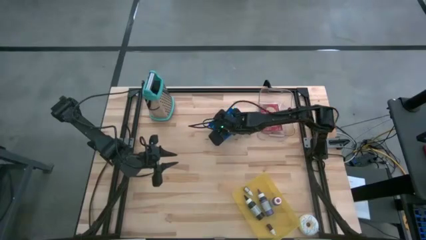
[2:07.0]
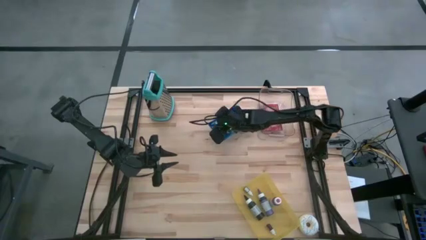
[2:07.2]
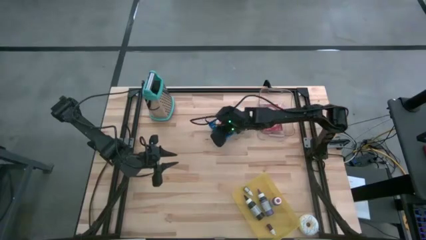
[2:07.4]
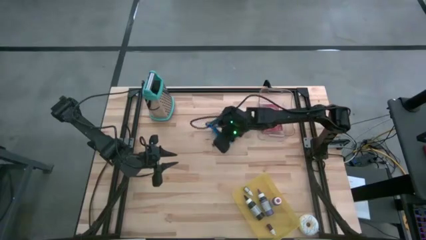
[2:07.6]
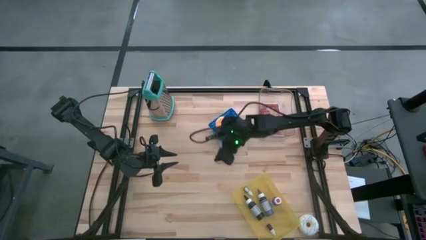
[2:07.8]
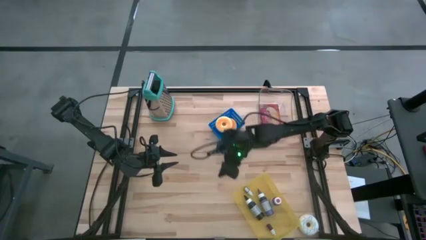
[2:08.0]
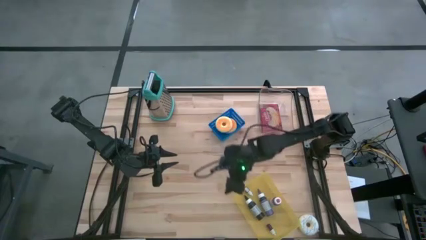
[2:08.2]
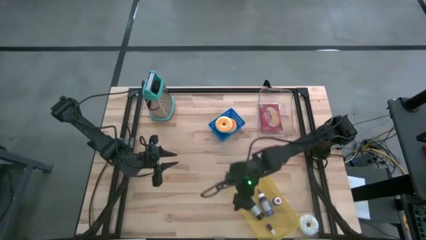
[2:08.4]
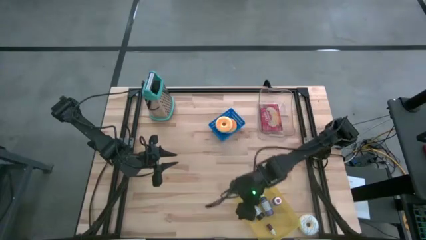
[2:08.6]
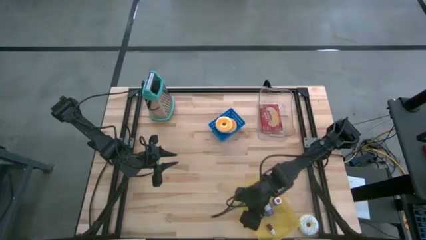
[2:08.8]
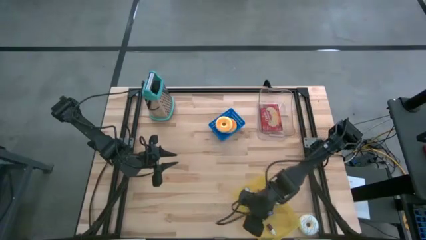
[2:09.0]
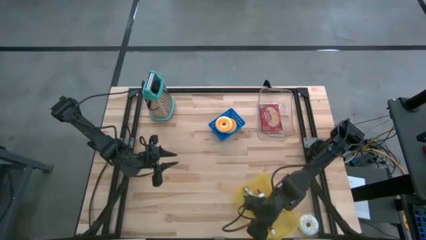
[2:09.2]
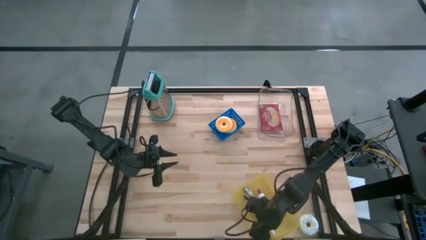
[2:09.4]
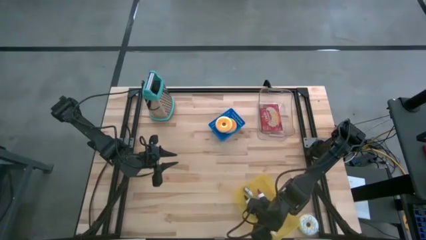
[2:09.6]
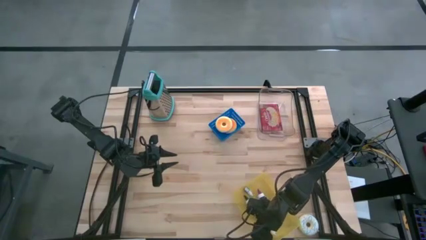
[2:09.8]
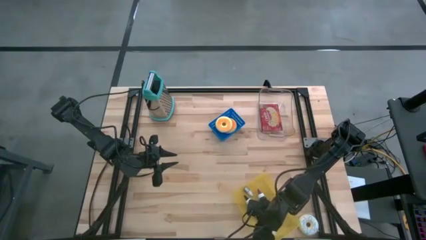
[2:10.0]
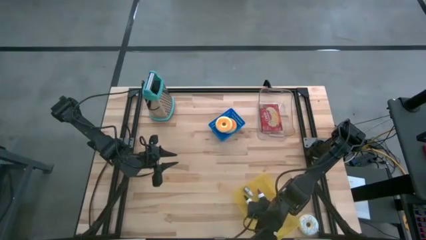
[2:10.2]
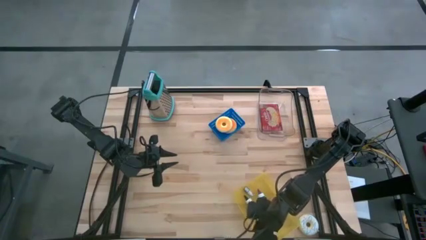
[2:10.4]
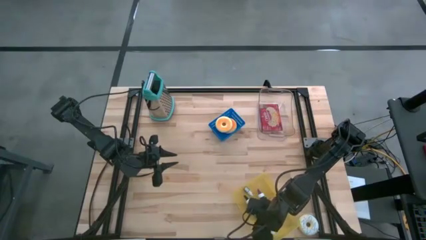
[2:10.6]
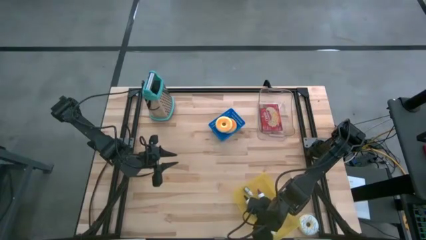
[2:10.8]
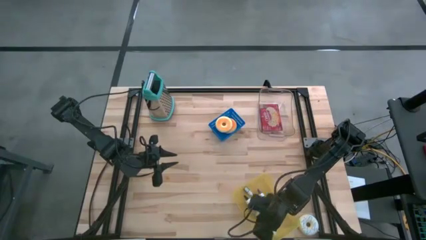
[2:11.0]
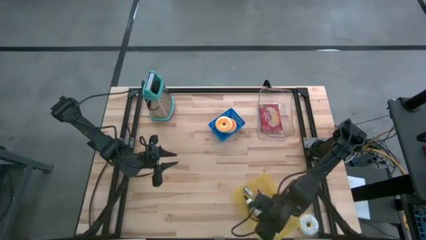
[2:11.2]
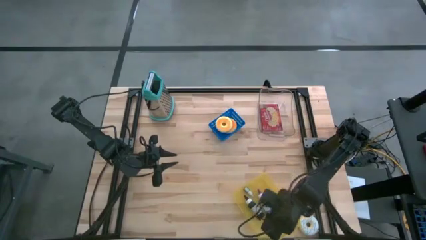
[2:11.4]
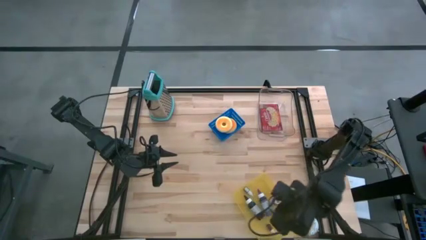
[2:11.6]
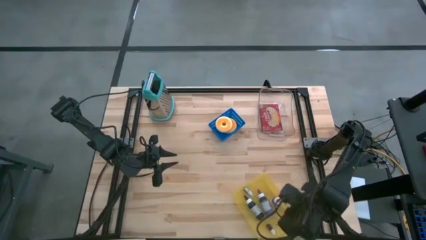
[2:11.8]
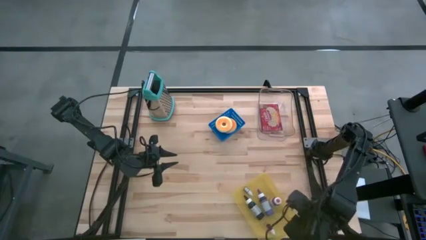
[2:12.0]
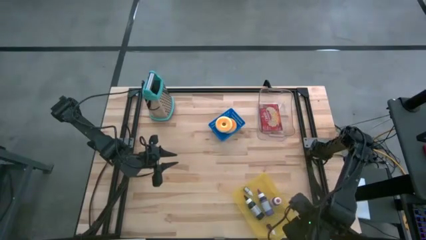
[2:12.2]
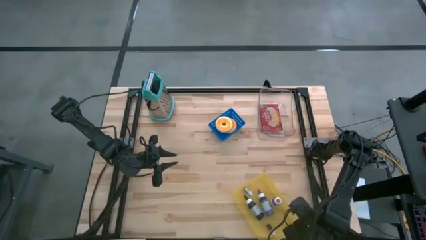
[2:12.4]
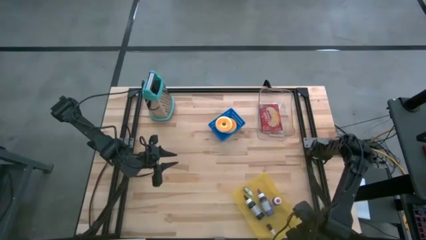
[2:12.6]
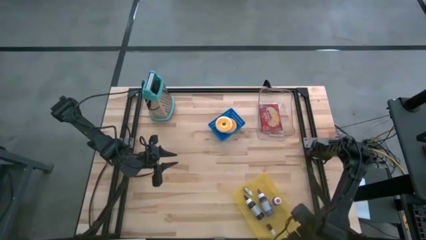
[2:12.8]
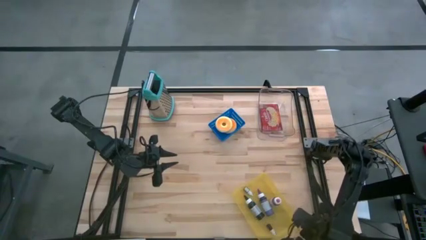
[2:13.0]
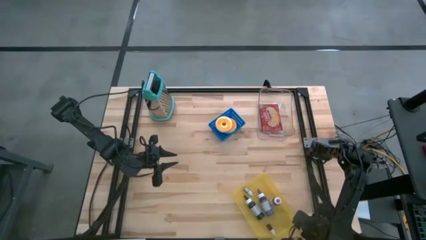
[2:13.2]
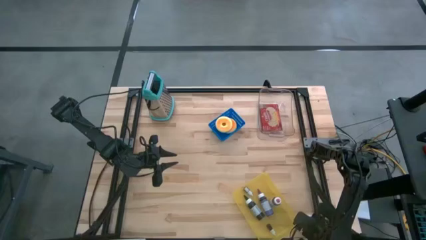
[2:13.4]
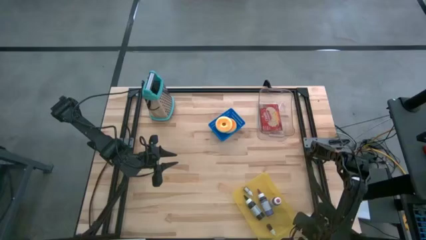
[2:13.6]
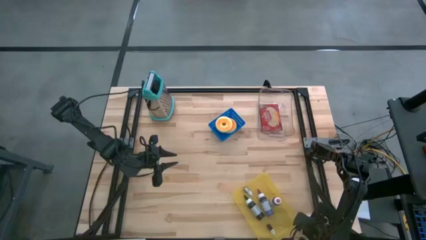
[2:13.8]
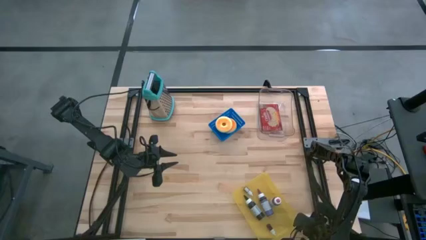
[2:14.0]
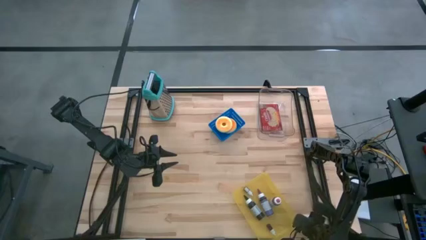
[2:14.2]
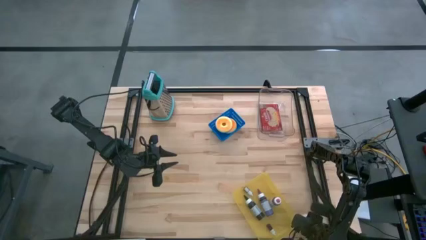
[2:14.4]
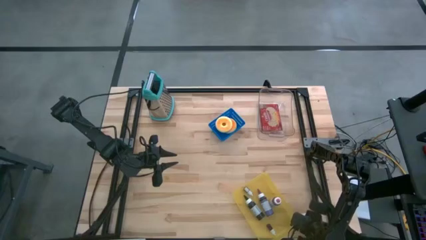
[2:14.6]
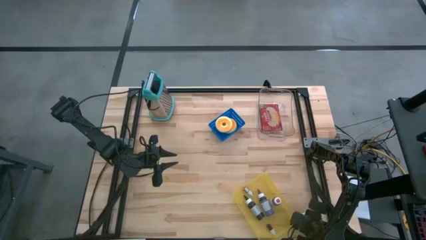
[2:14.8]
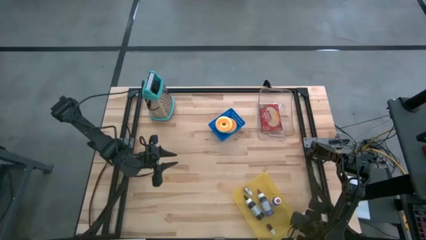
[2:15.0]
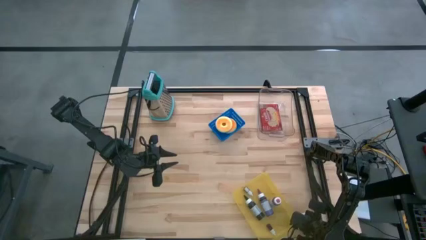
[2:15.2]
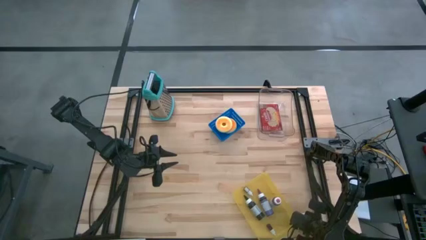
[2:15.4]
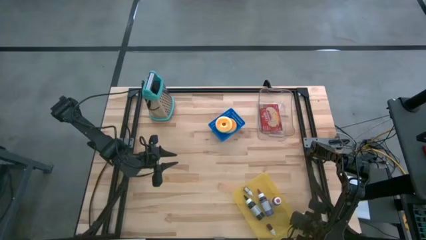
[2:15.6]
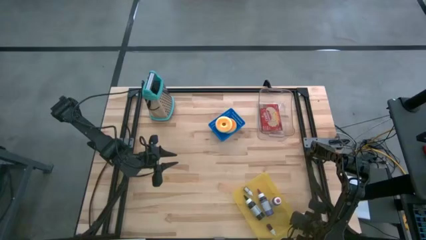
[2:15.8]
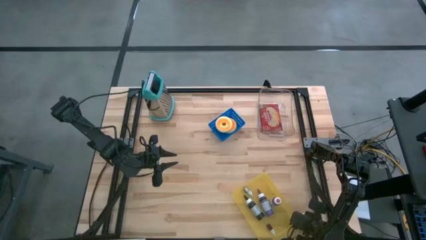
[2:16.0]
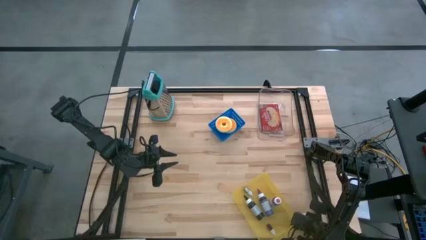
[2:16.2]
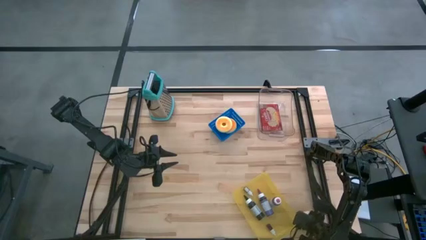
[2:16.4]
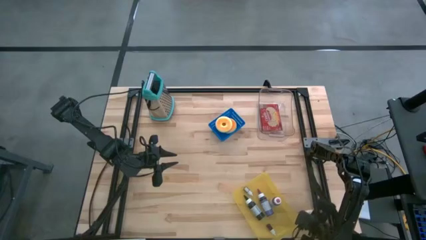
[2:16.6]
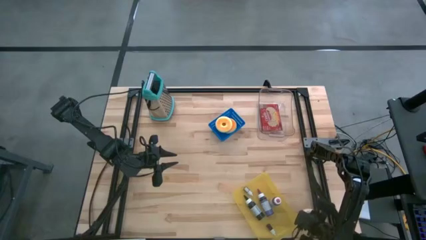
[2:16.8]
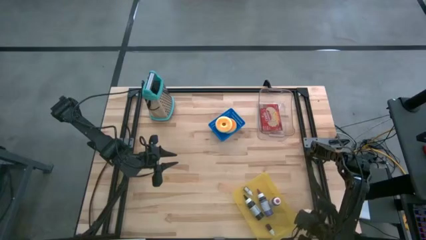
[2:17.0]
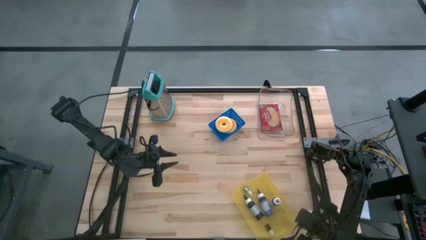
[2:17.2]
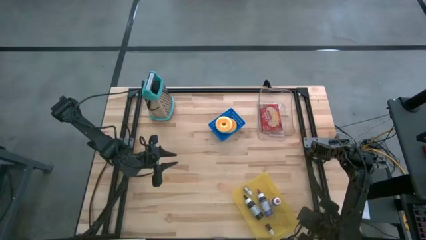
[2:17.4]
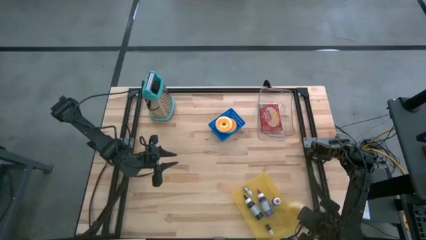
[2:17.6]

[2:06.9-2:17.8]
Task: Pick & Place Food Item
Stack the orange donut on top of the top orange donut in the blue bin

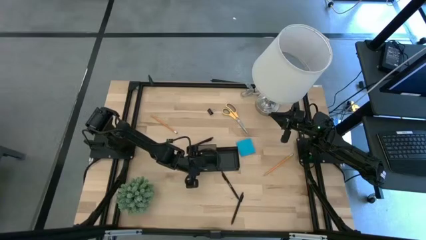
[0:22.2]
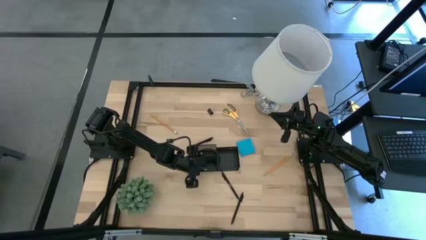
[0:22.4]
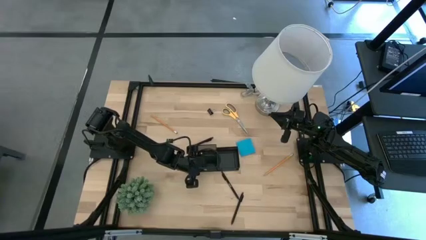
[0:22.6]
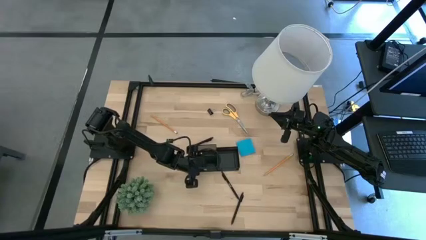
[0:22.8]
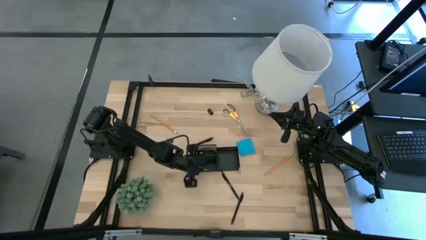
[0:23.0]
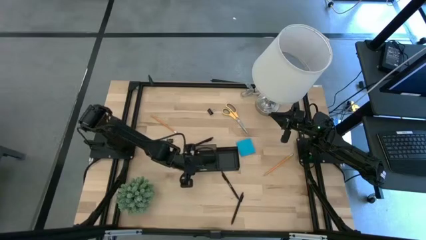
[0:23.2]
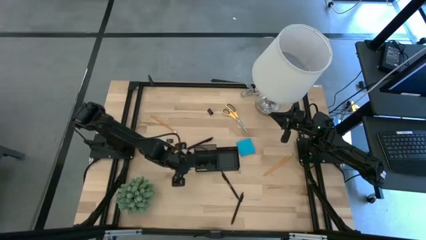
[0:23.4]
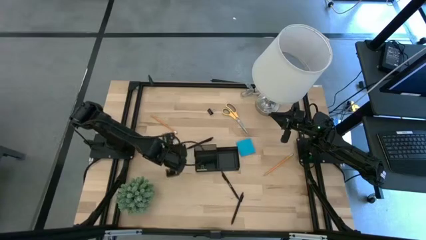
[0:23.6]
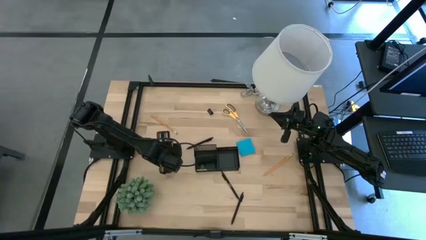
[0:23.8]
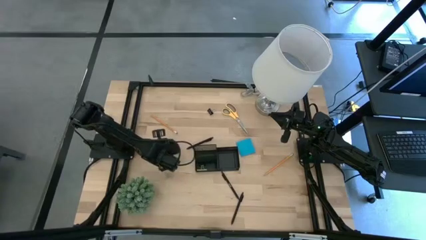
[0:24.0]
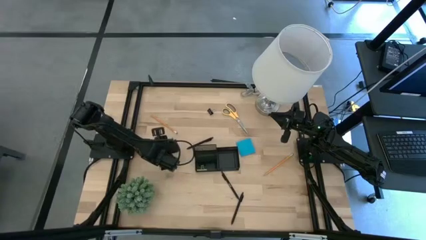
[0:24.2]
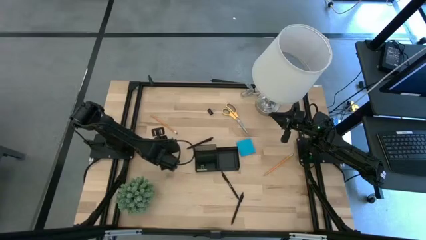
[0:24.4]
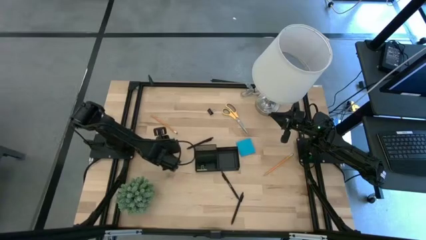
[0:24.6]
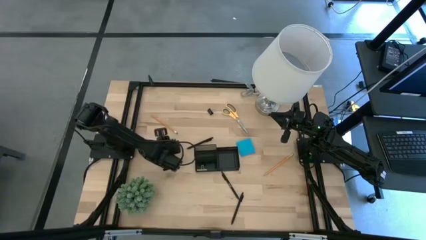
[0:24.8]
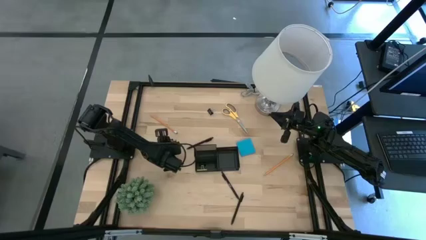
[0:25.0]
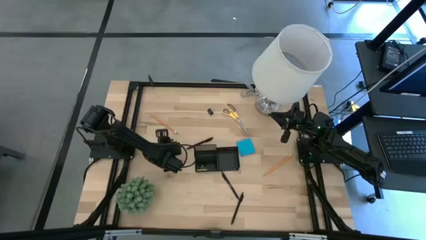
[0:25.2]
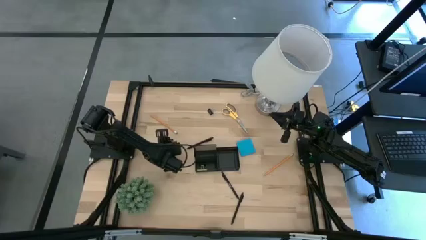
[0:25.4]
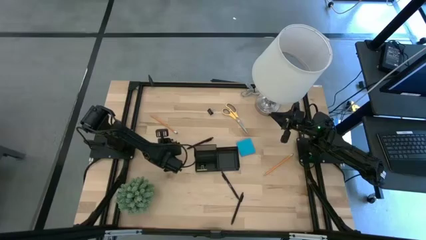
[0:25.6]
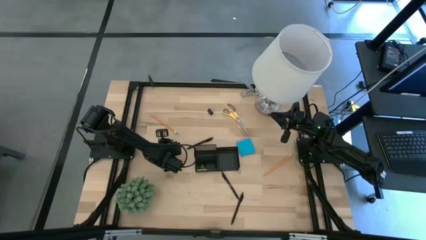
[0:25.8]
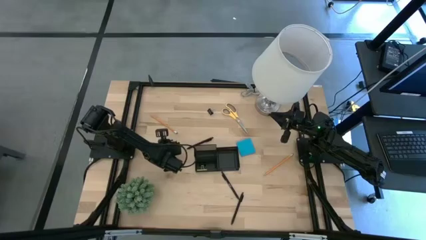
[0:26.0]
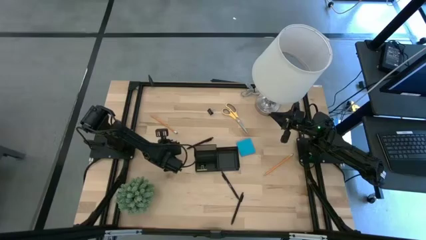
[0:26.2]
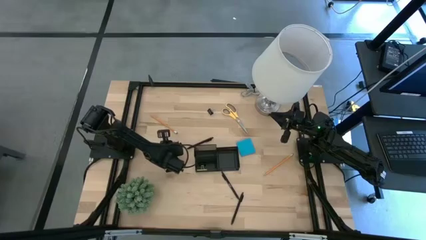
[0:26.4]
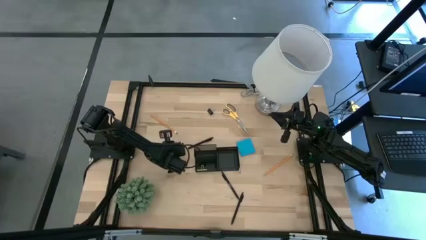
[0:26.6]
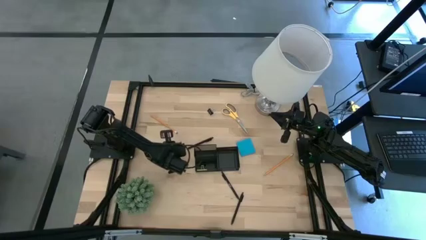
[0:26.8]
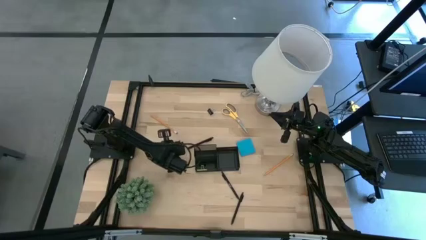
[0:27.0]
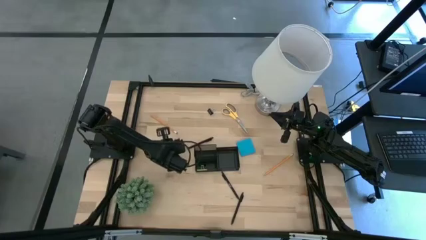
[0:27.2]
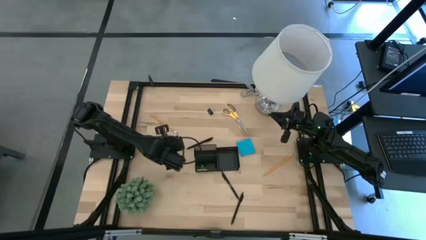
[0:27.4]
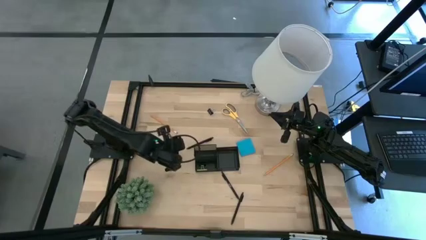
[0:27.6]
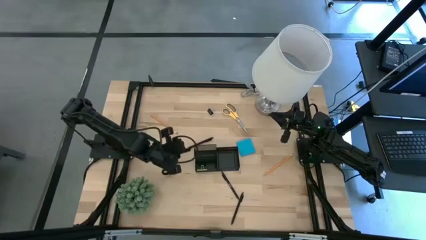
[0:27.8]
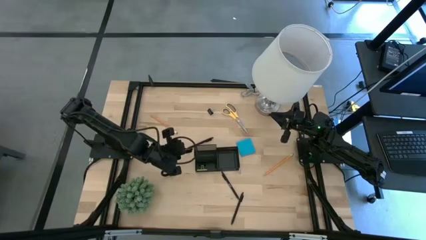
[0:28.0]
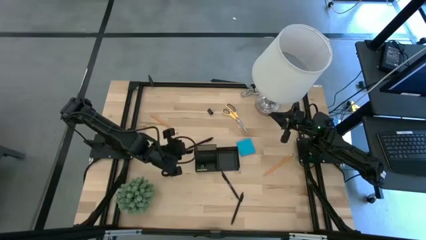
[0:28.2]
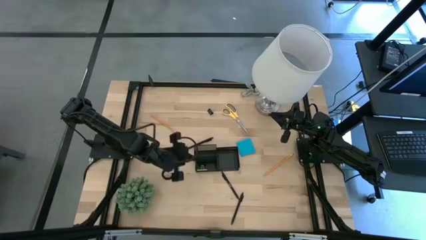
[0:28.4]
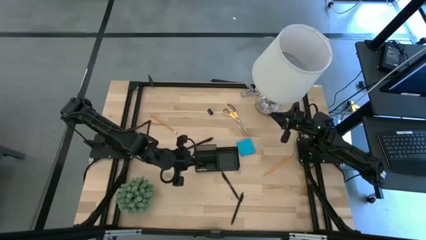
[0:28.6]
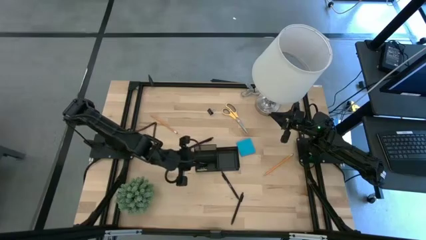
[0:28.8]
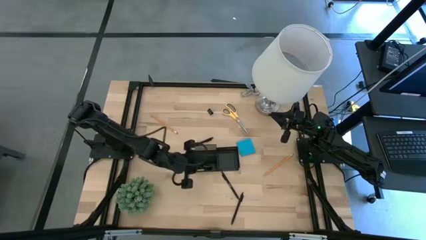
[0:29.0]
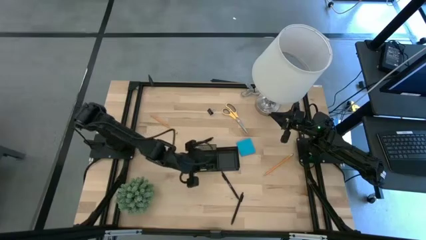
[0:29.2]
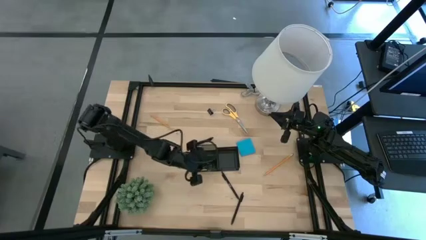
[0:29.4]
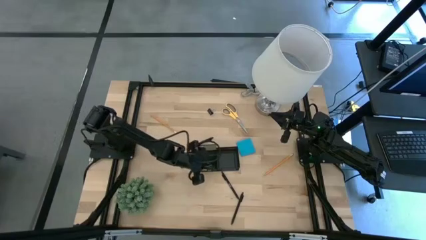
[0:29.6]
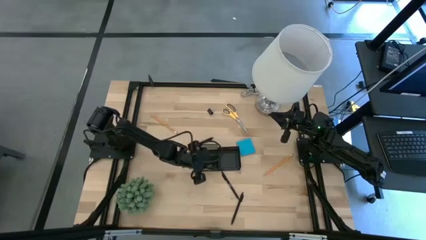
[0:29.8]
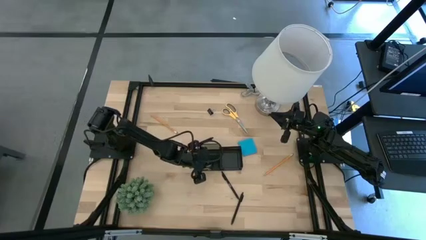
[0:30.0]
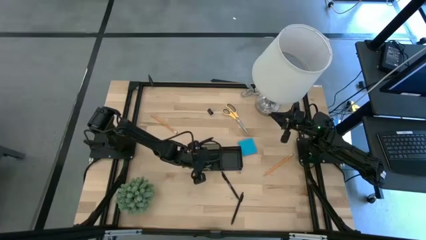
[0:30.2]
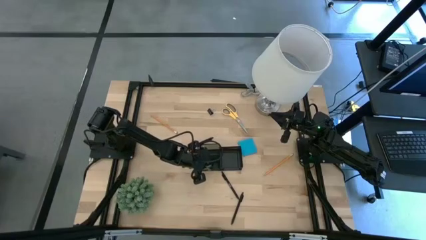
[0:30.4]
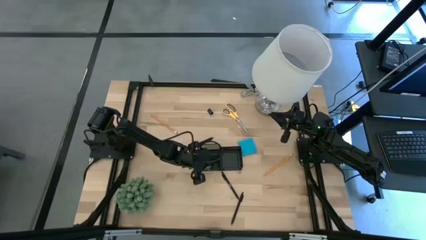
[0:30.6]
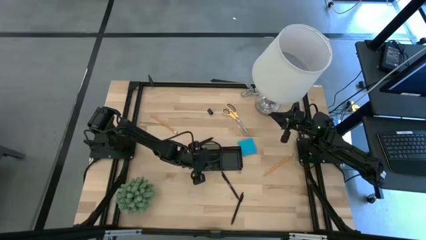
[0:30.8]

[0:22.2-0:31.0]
Task: Pick and place office supplies into organizer
Put the bottom black binder clip into the desk organizer
